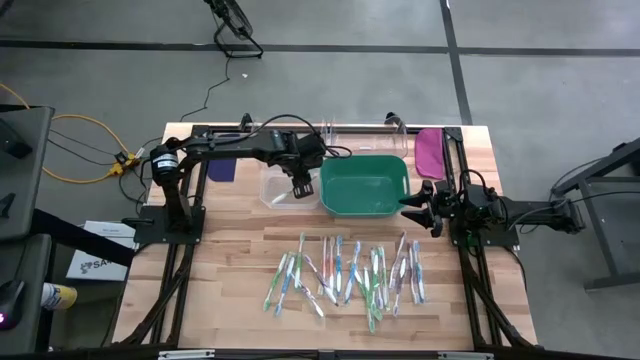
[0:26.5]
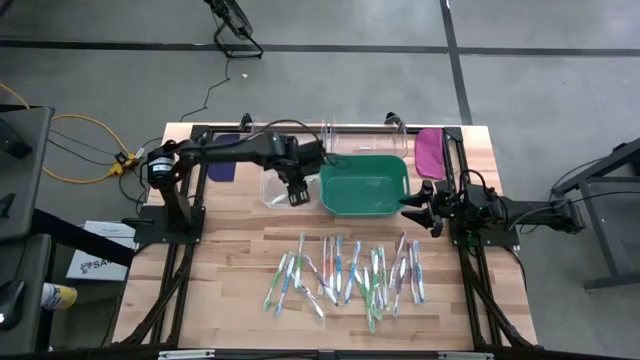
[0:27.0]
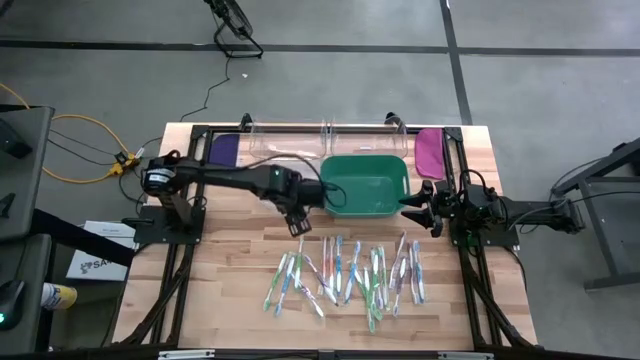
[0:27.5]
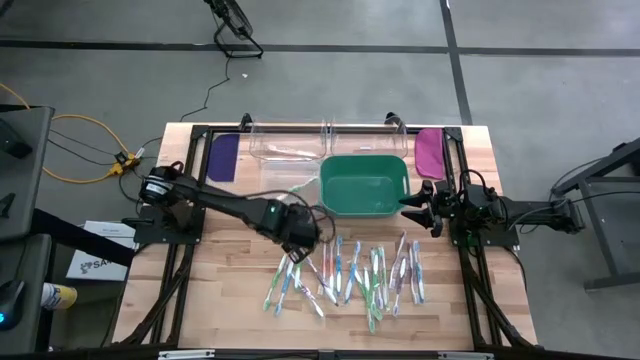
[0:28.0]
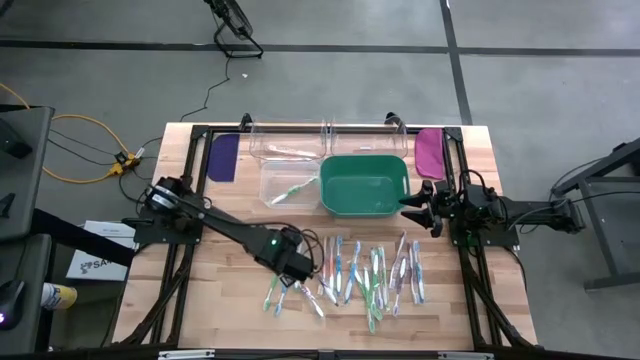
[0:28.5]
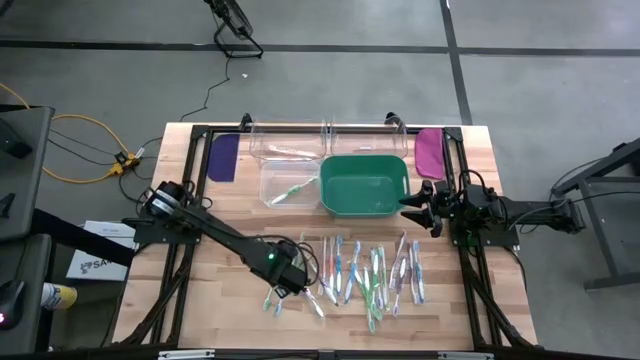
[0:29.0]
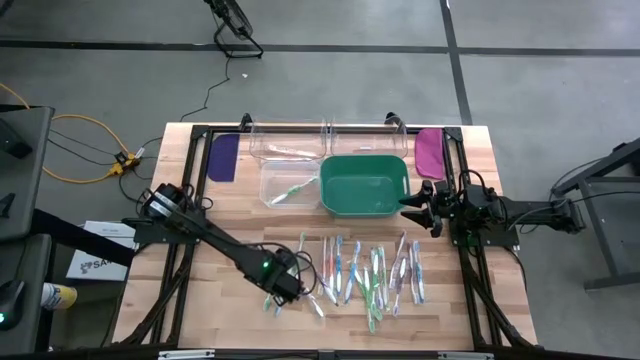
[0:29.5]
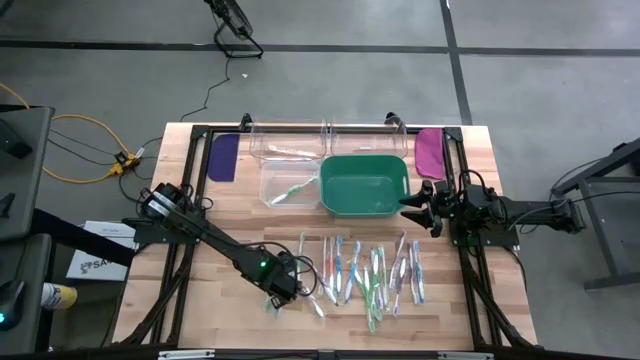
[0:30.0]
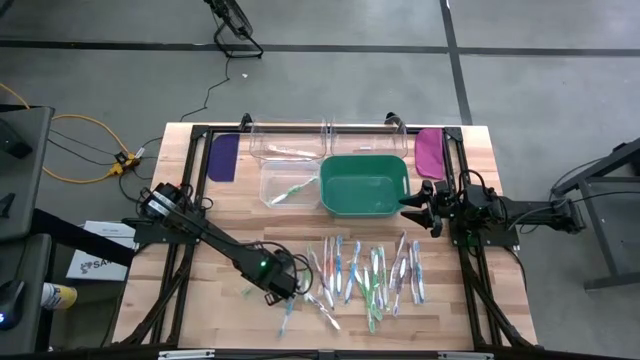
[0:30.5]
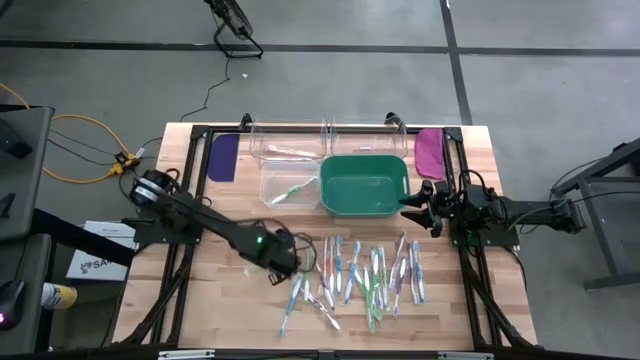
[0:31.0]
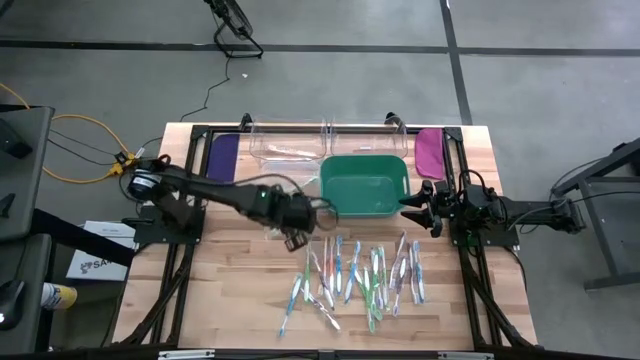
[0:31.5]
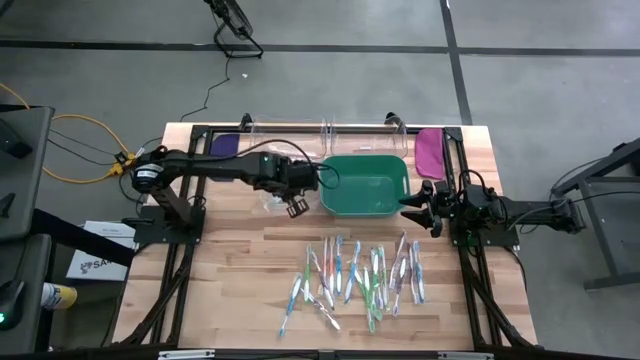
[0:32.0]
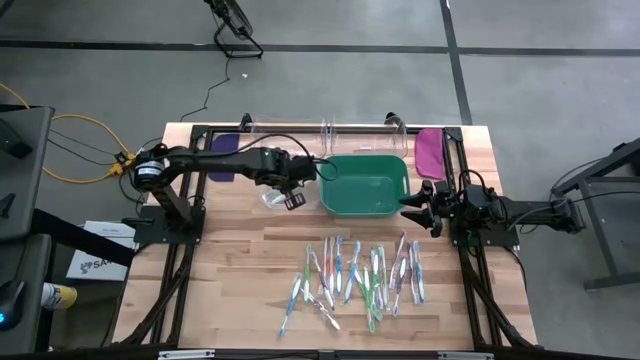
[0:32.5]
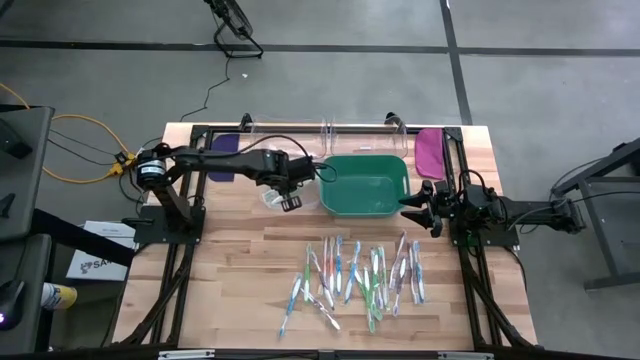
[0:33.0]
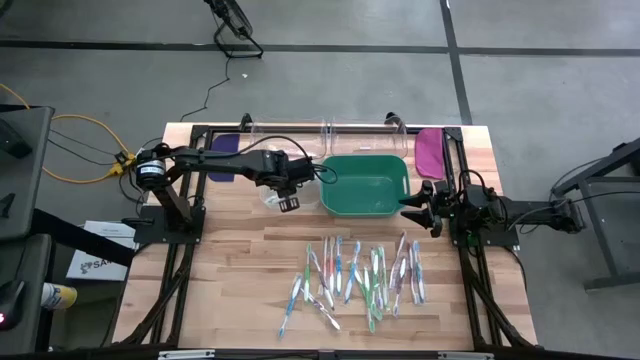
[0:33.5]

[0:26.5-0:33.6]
Task: Pick & Place Toothbrushes
Put the green toothbrush into the white bin

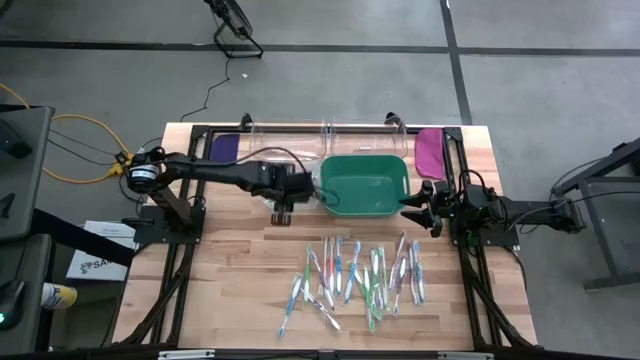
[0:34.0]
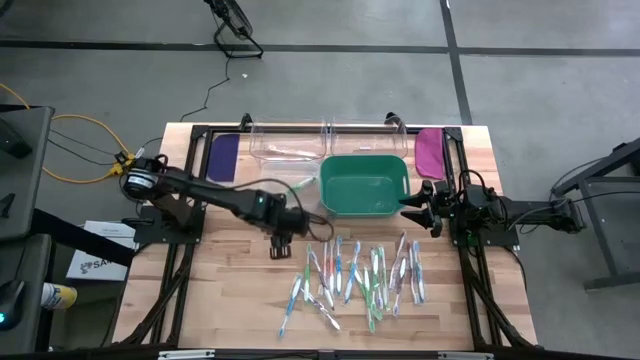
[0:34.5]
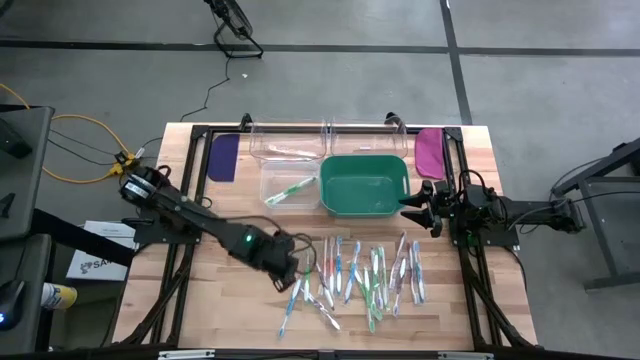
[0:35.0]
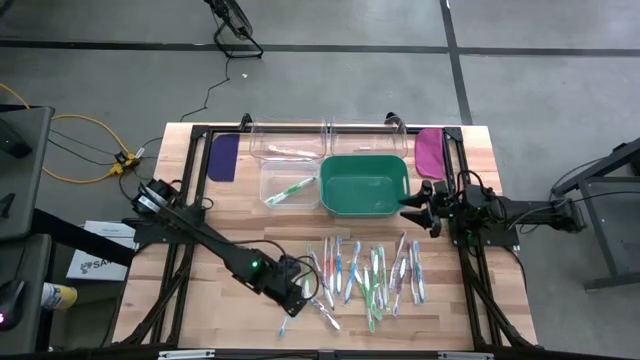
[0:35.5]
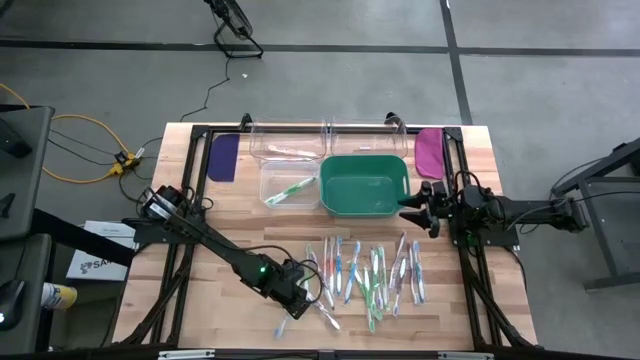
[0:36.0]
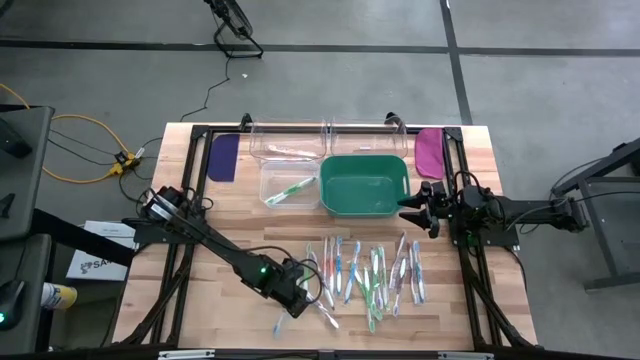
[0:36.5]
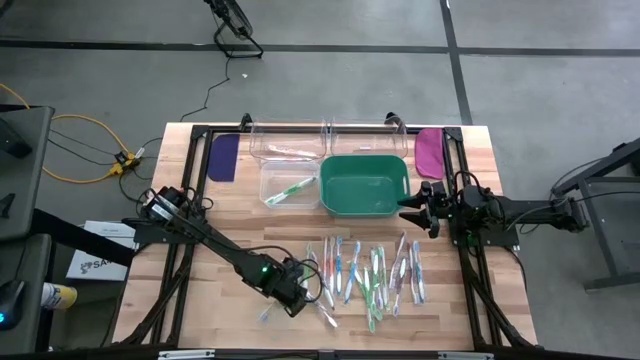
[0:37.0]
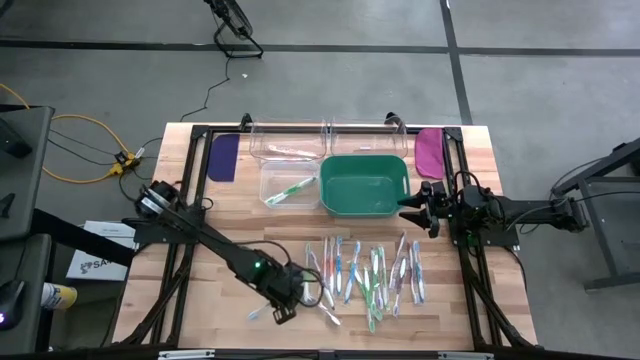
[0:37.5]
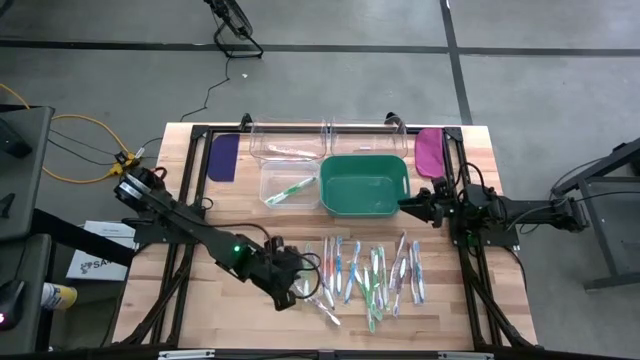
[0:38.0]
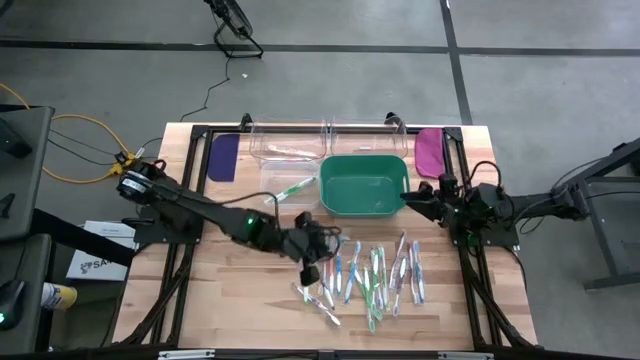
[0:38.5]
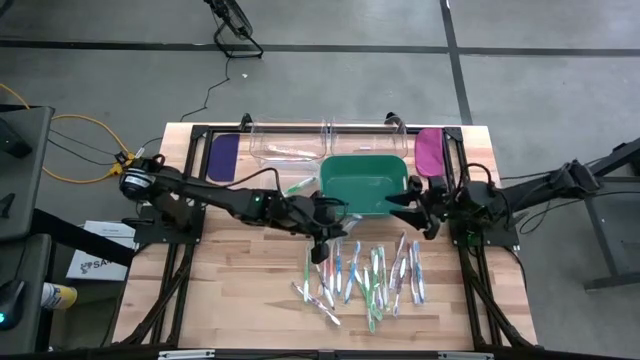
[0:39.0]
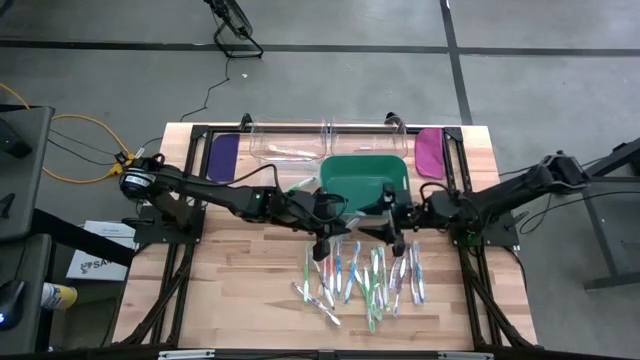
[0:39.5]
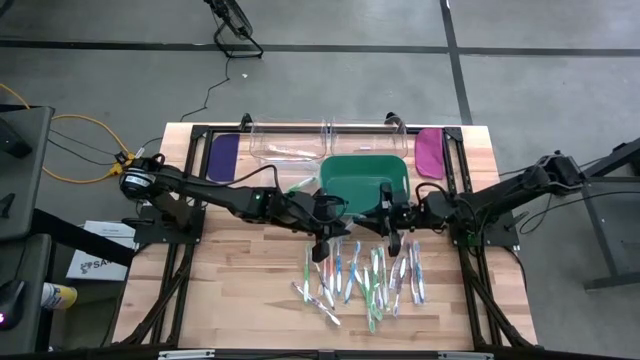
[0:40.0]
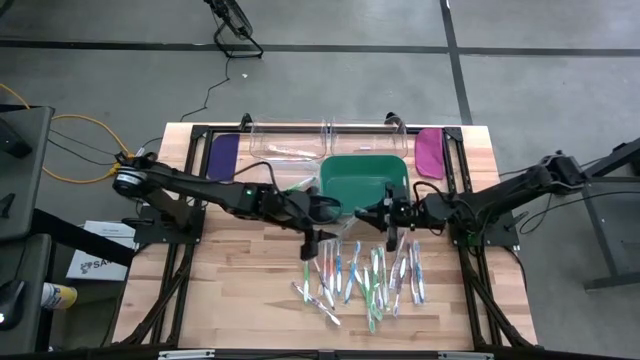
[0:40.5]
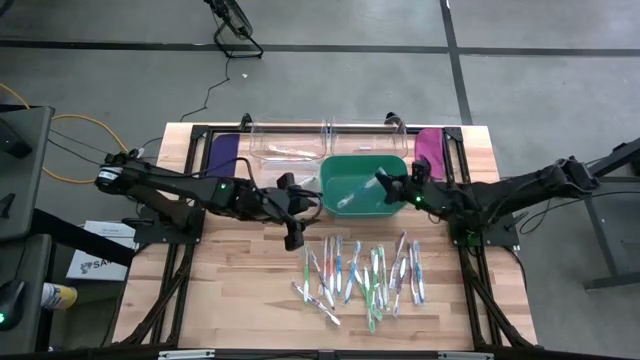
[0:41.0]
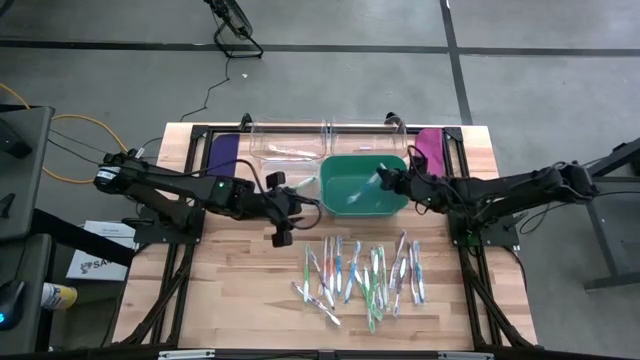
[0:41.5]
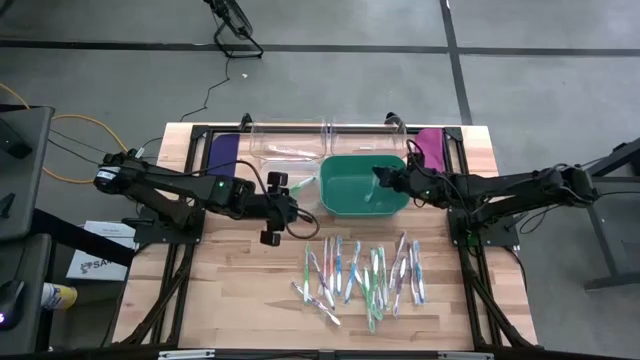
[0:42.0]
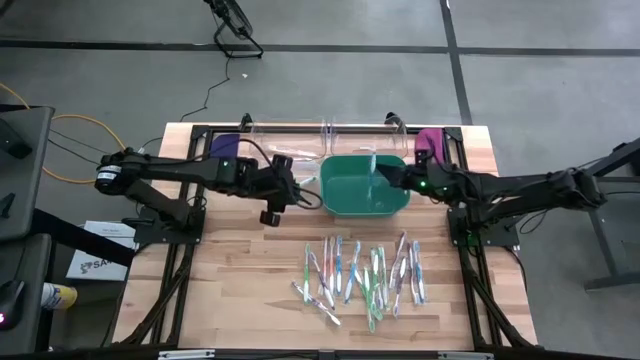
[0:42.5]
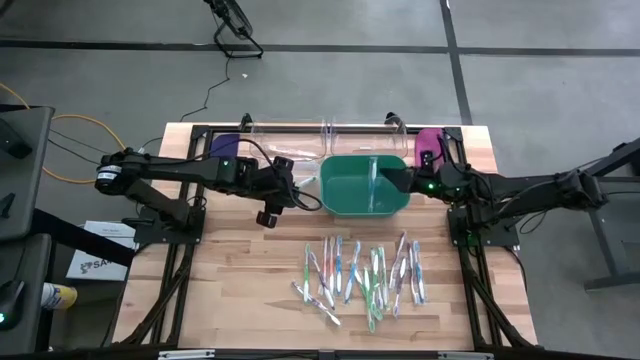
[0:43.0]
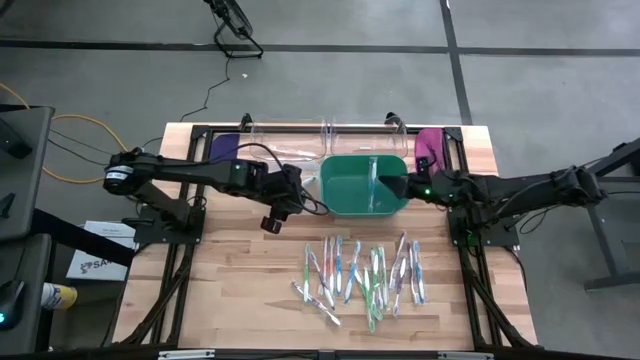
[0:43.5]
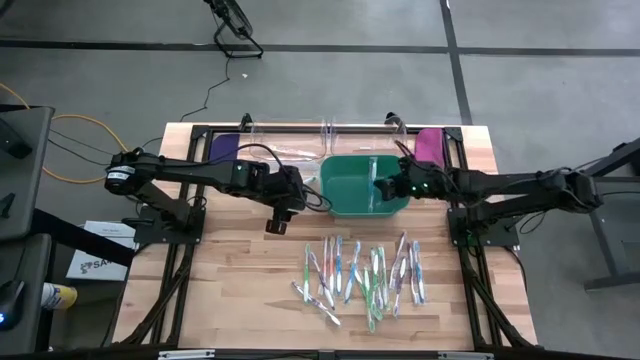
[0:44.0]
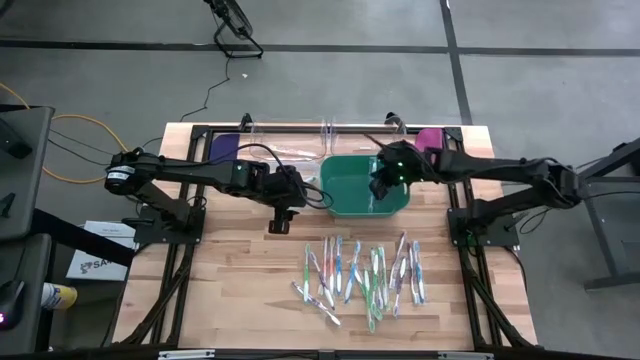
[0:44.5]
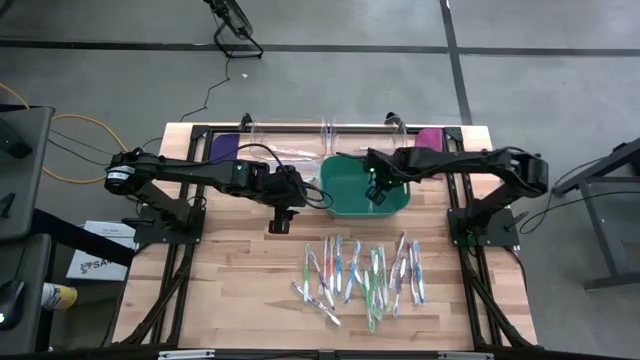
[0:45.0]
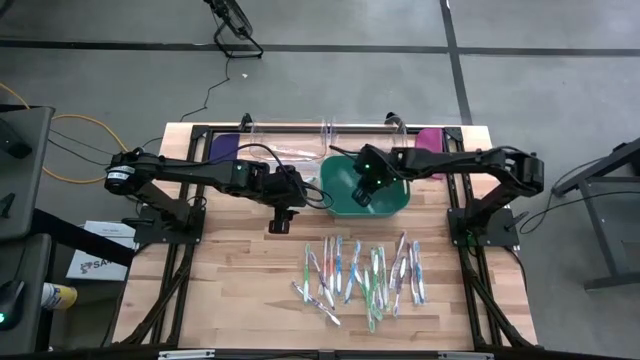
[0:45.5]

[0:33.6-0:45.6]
Put the blue toothbrush into the green bin

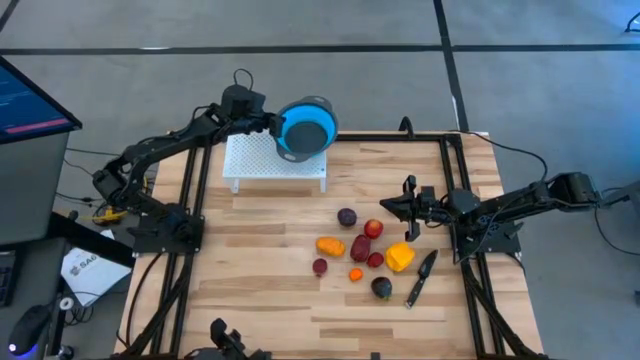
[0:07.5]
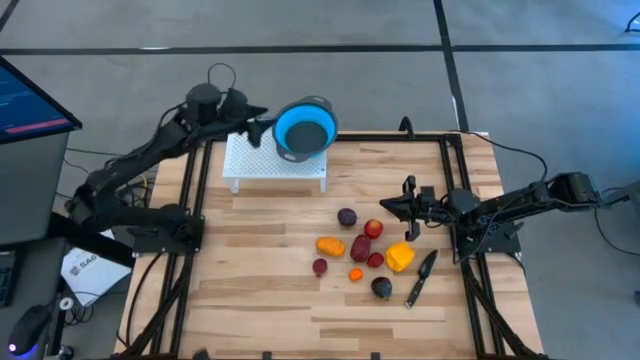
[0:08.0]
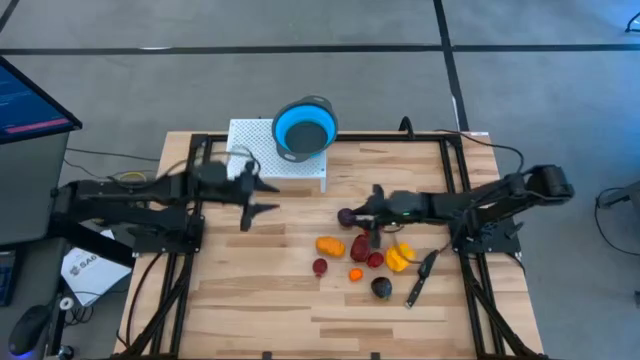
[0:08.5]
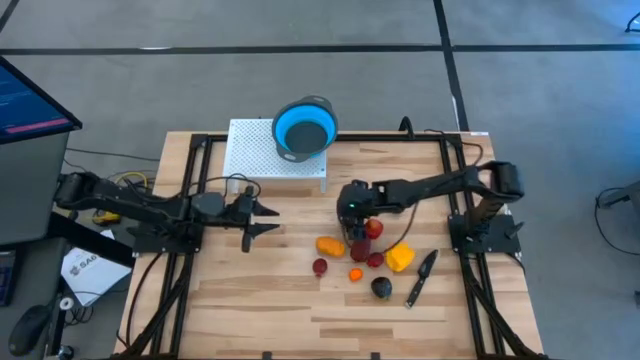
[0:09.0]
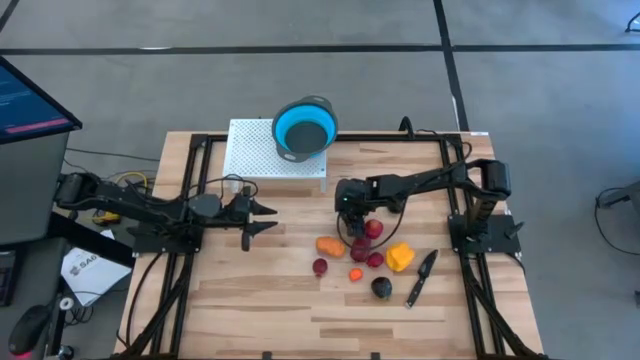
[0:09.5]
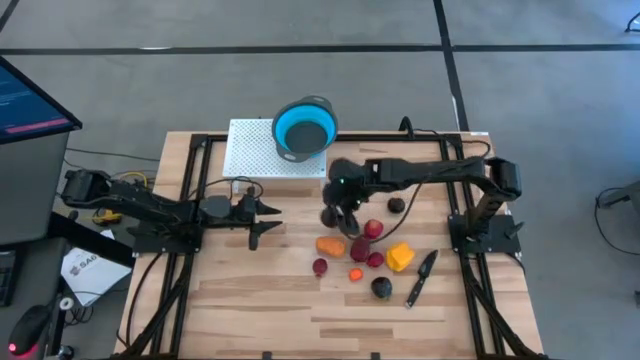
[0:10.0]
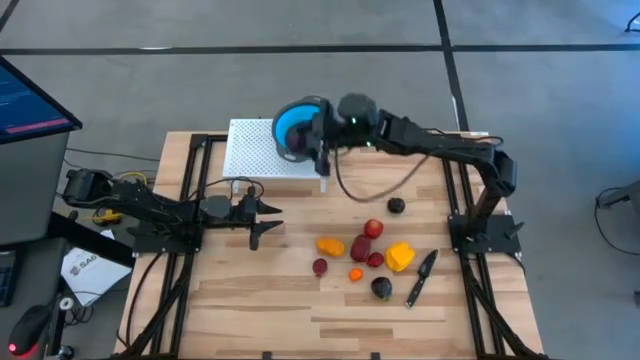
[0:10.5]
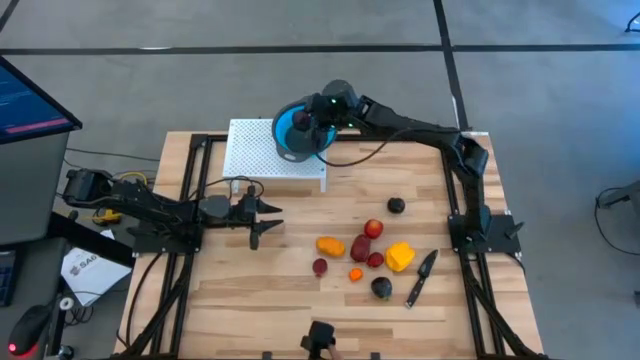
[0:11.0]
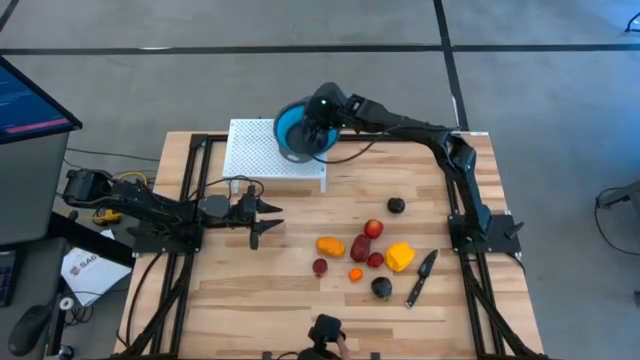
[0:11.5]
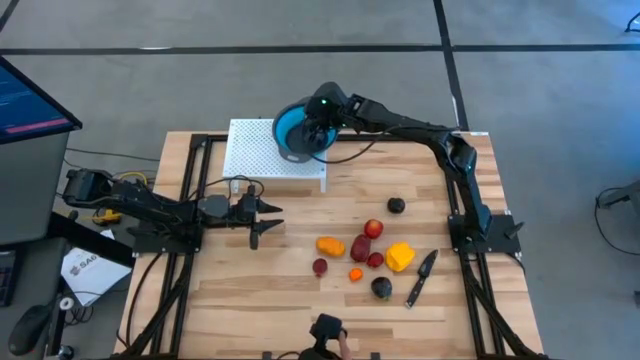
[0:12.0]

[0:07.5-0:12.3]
Task: Pick & Place Fruit
Put the dark purple plum into the blue strainer bowl
